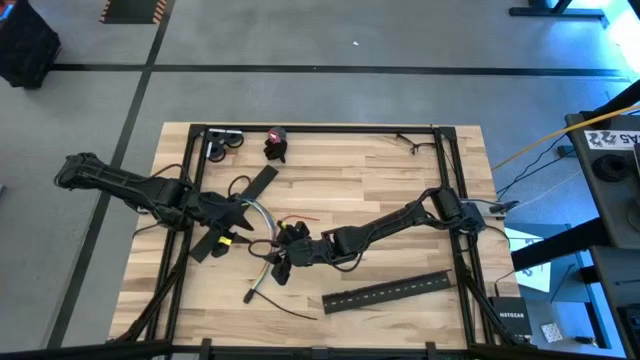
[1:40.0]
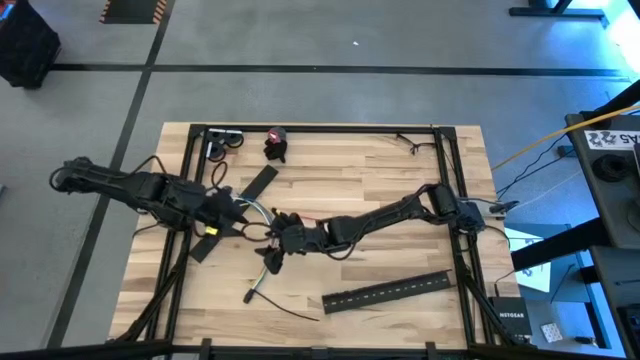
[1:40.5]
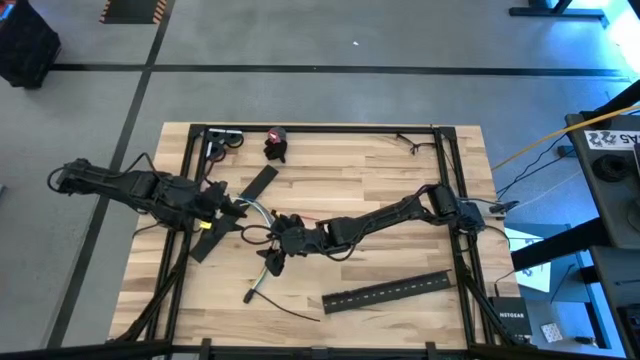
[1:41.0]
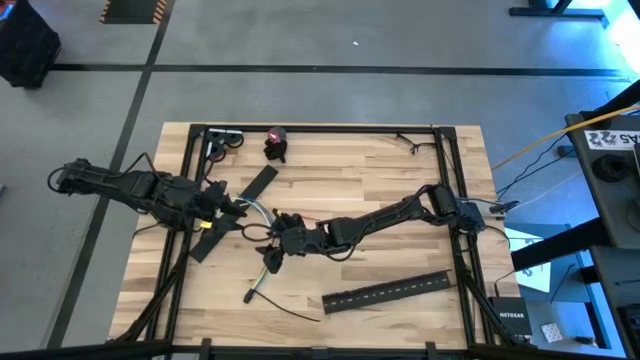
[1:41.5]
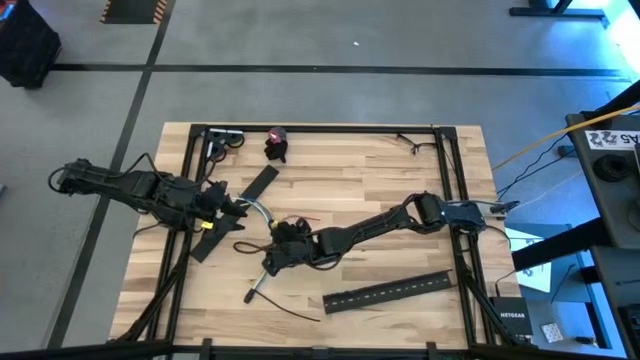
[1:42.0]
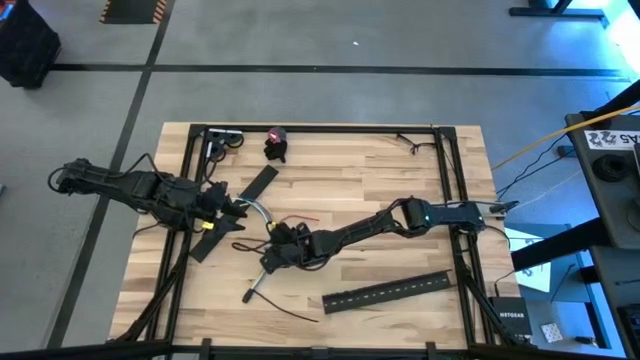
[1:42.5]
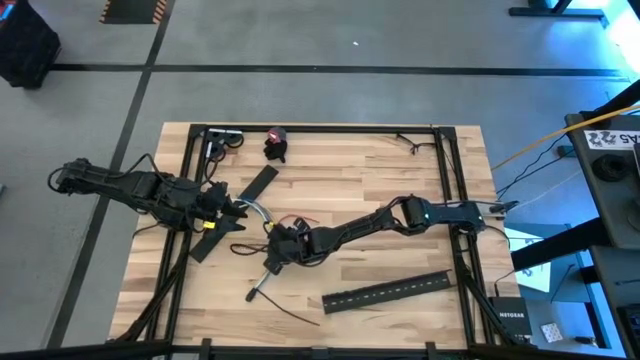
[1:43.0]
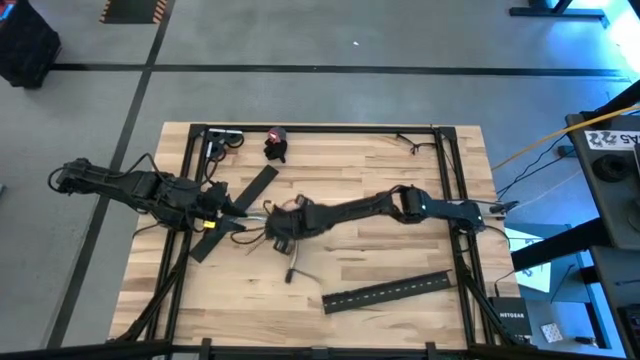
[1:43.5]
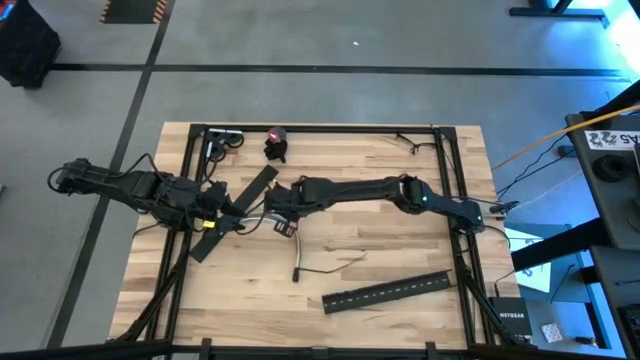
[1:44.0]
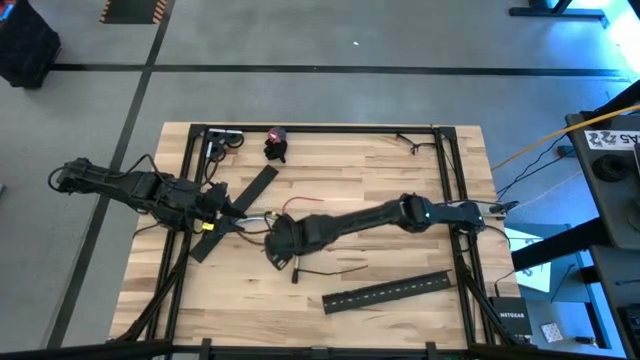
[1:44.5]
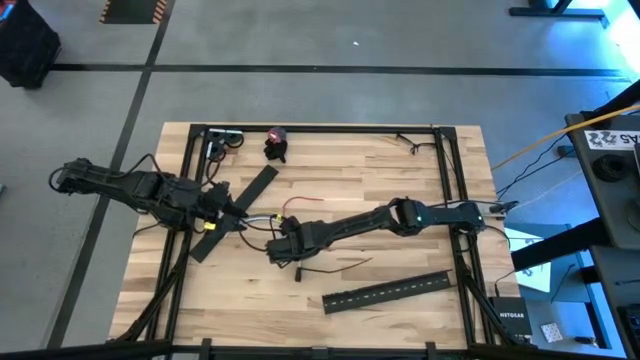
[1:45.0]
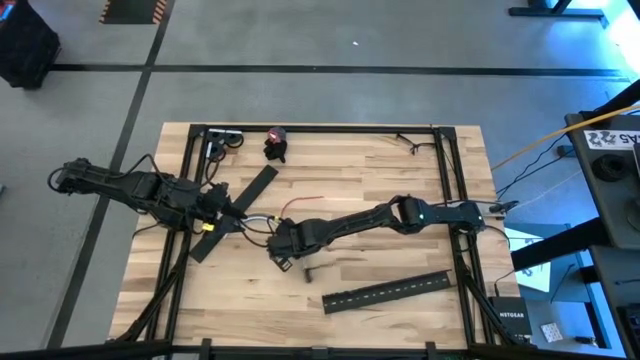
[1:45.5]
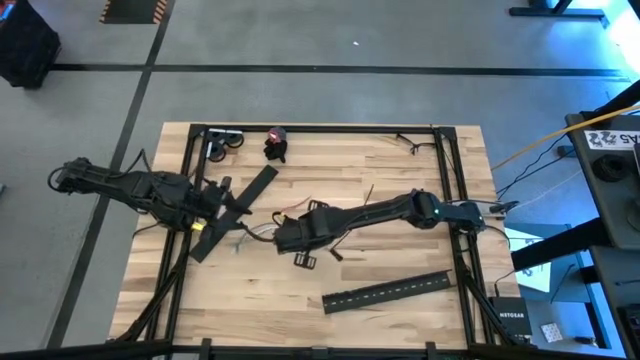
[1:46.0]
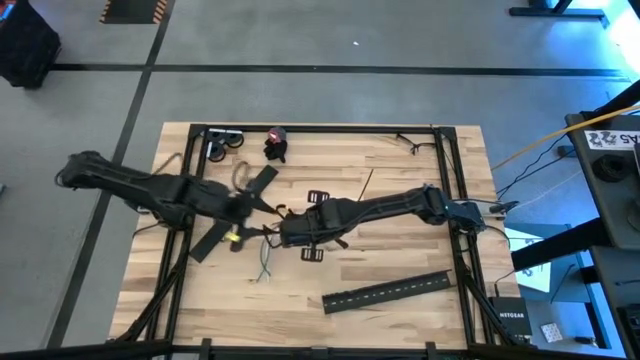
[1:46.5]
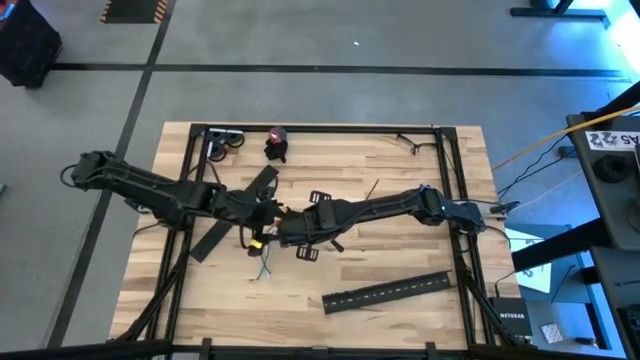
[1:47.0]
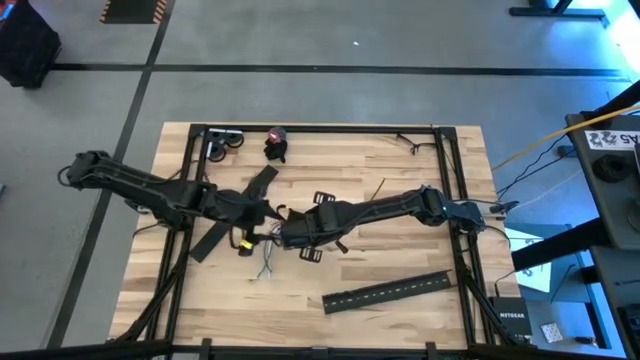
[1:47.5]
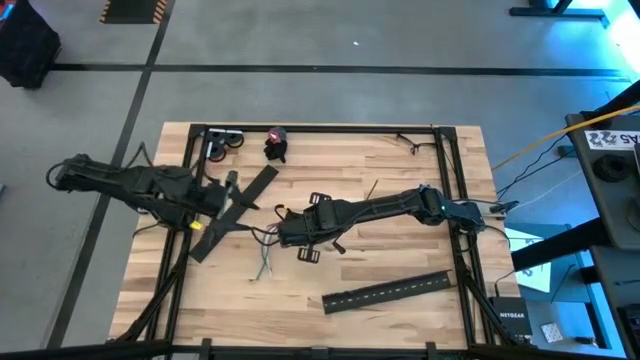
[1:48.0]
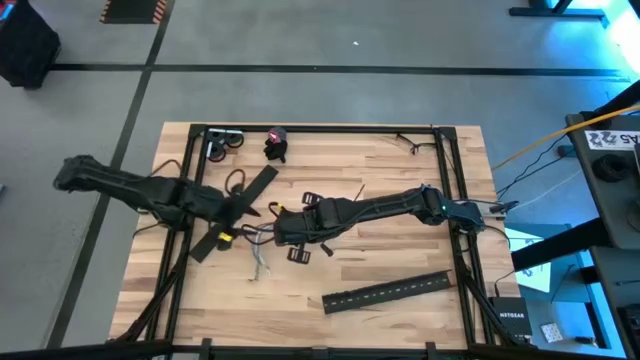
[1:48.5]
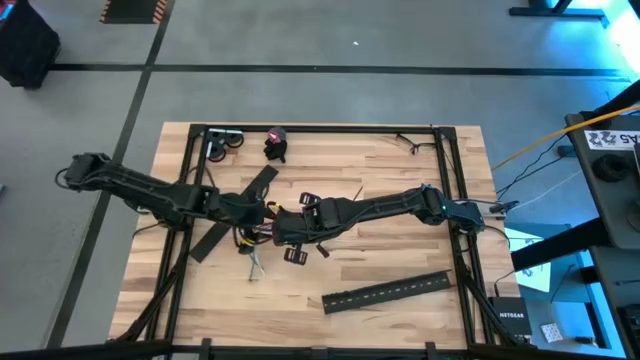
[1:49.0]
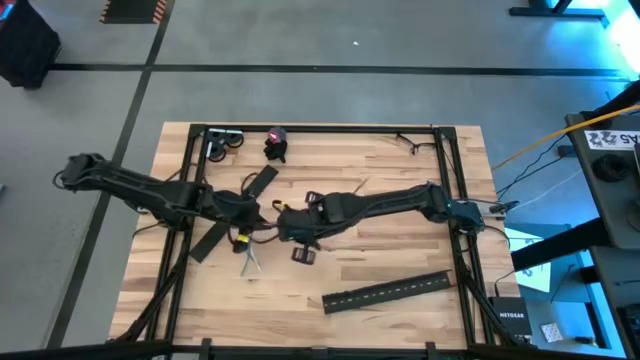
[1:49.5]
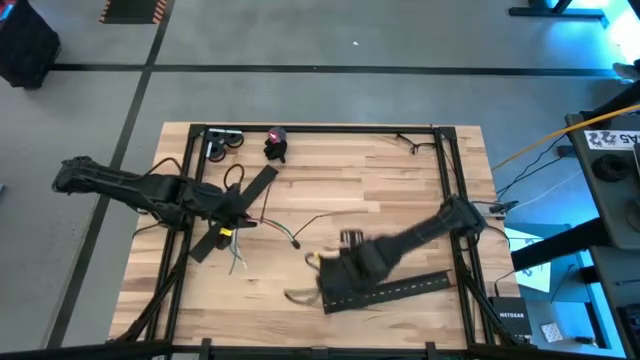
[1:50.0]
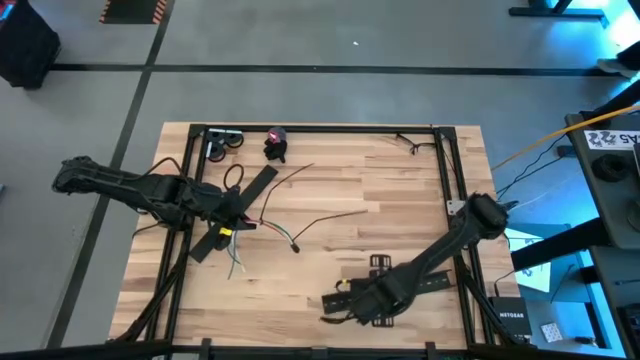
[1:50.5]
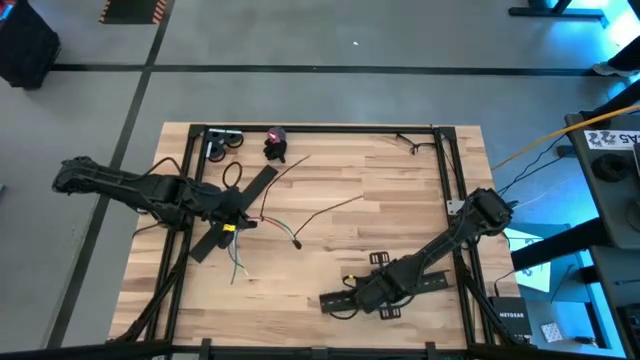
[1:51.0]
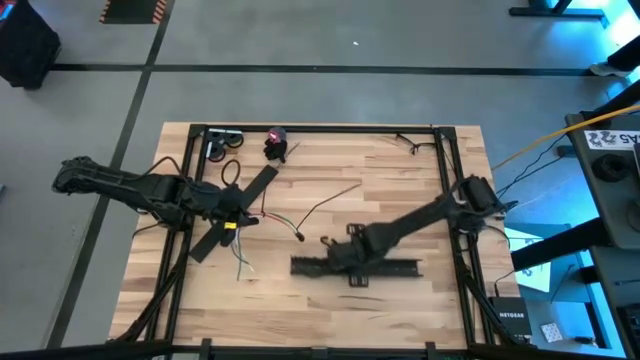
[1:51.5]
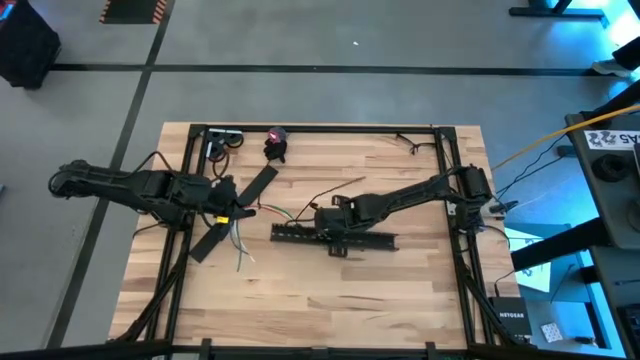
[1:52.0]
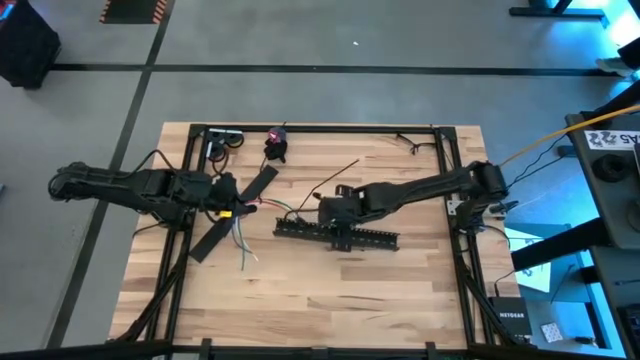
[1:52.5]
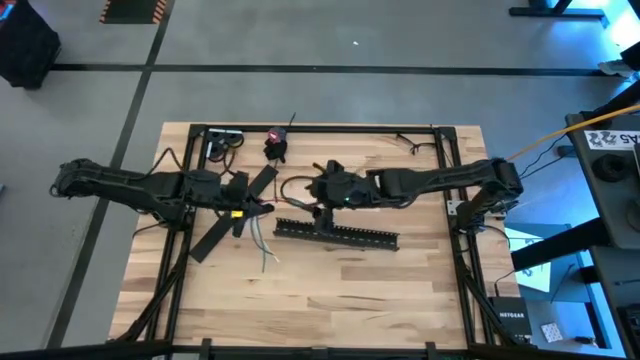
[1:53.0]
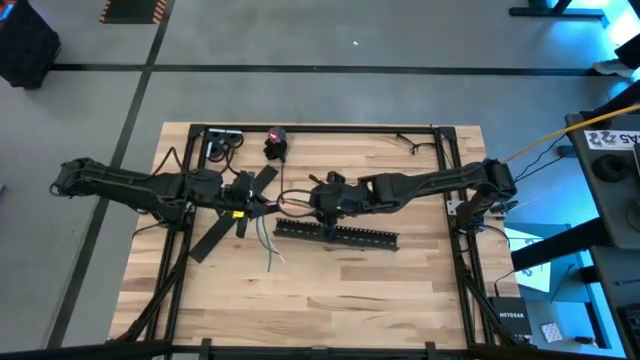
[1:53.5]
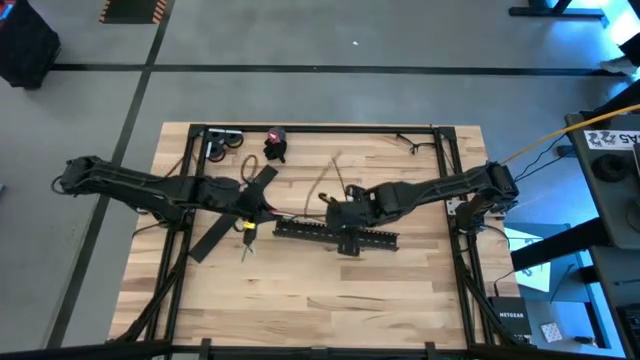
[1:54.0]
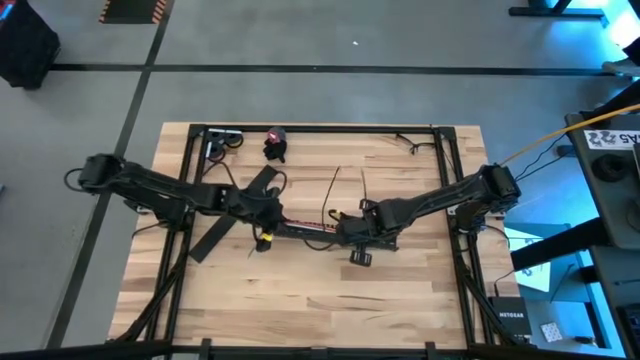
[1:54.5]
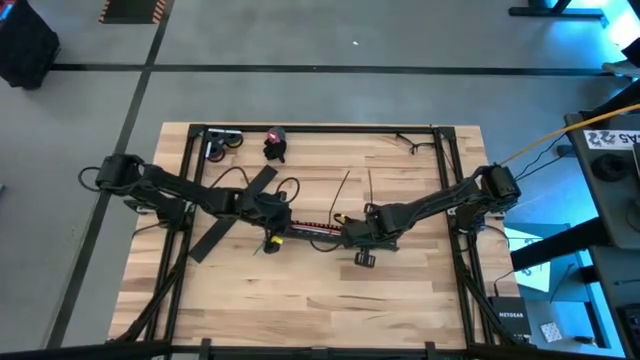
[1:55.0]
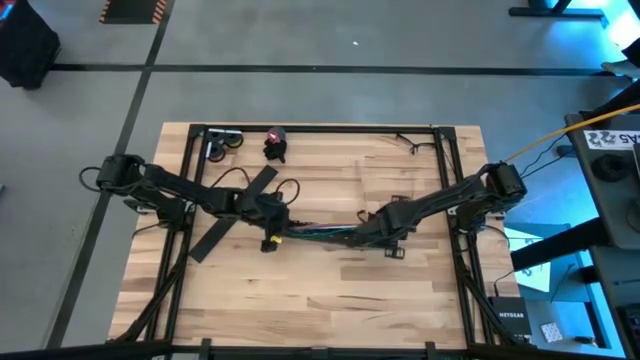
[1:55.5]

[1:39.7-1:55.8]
Task: Ziptie cables
Put the ziptied cable wires into the black cable duct

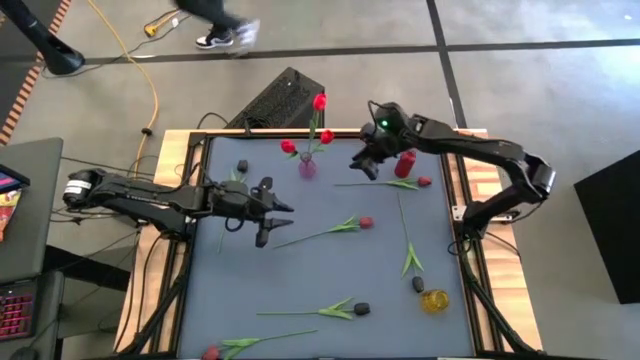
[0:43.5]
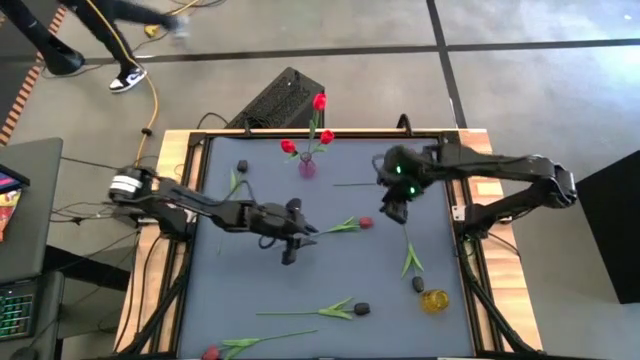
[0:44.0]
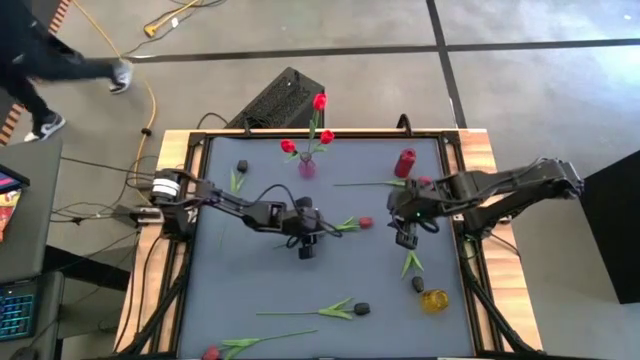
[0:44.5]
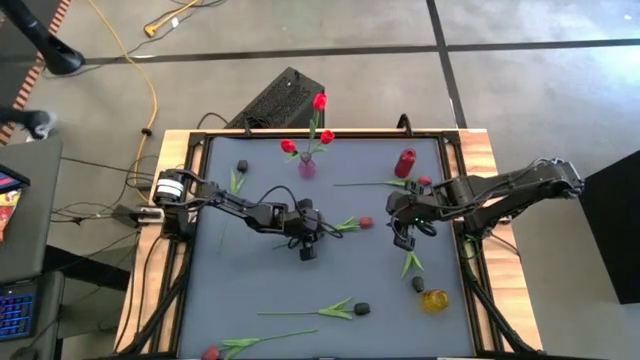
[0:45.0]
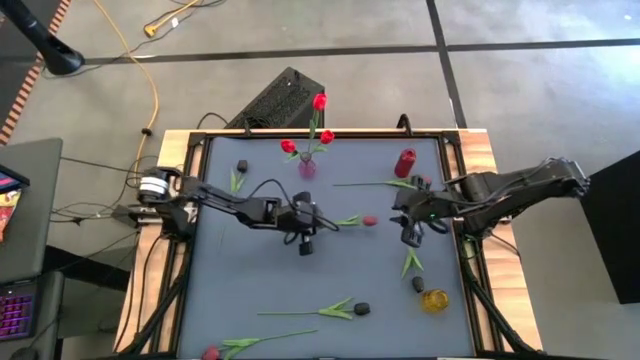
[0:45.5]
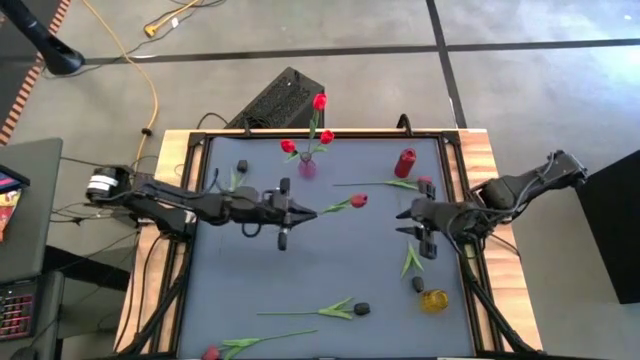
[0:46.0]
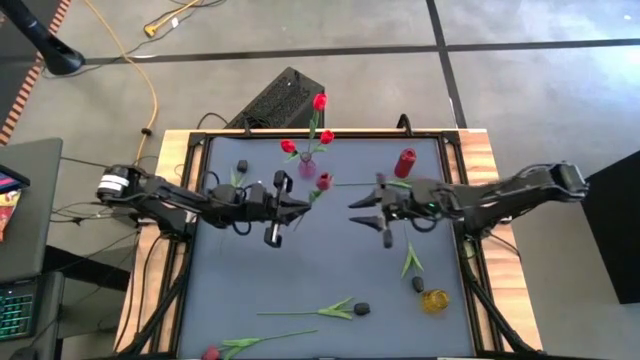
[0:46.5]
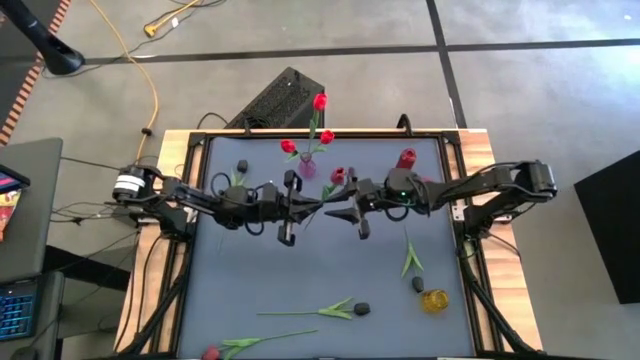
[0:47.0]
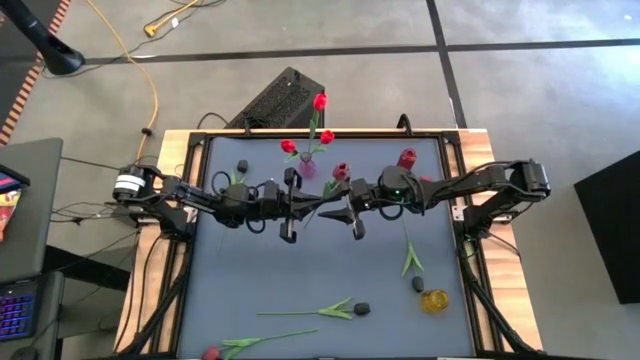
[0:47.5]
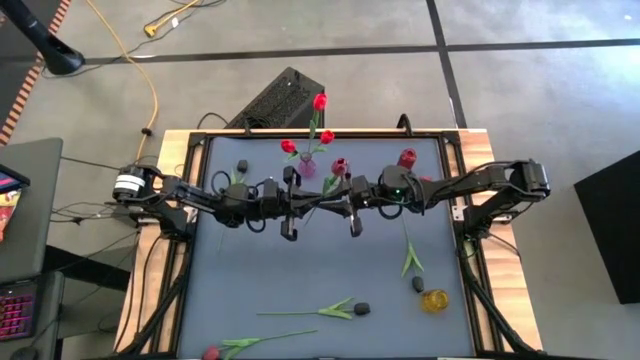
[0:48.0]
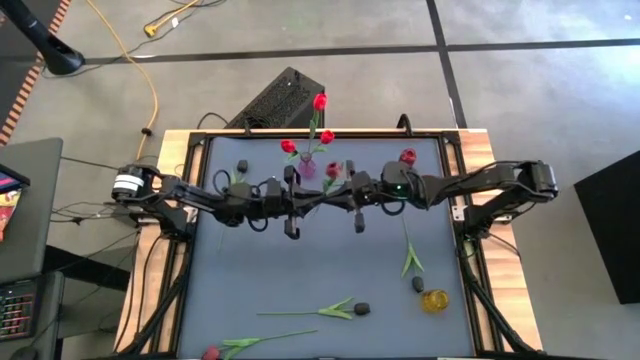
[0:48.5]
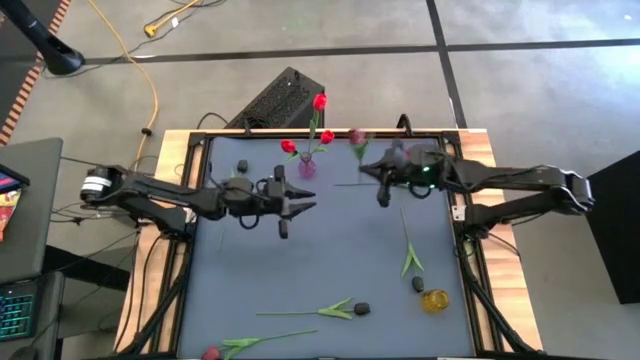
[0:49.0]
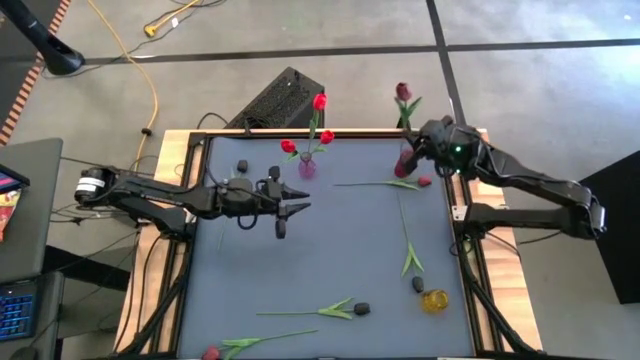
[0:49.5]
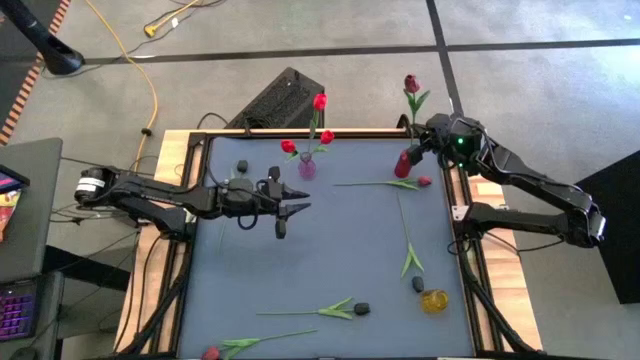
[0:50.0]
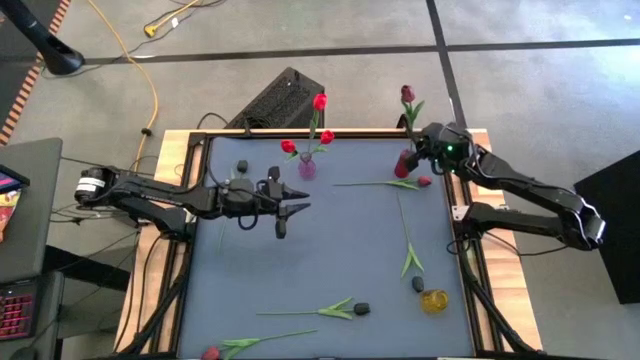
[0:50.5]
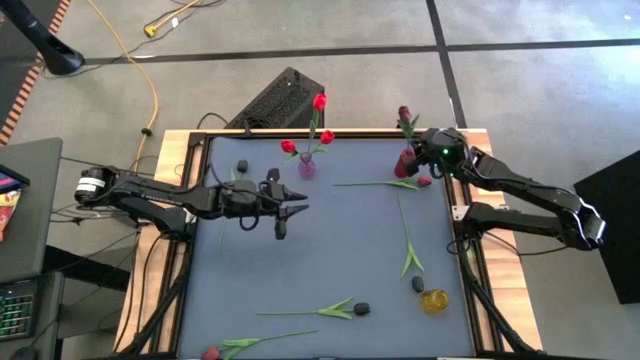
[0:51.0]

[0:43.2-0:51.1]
Task: Sort flowers into vase by color
Put the middle red flower into the red vase
